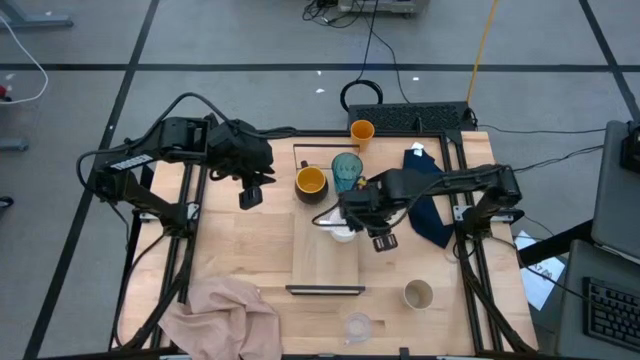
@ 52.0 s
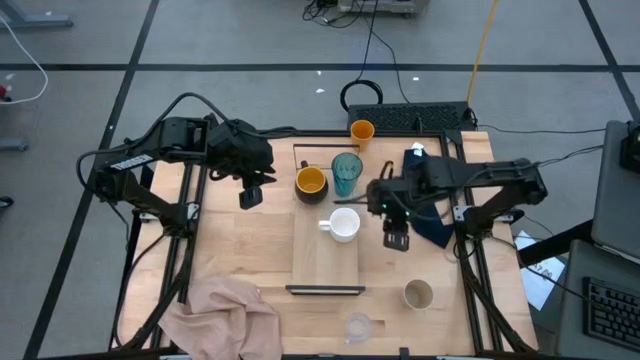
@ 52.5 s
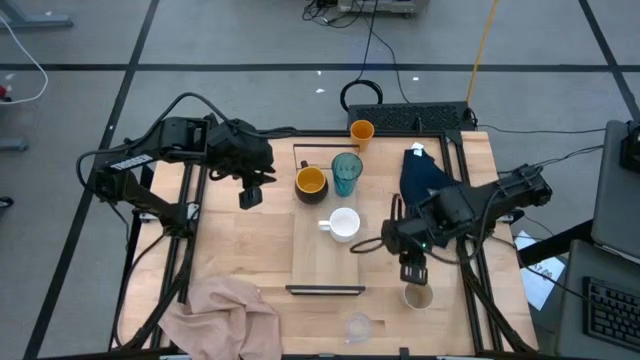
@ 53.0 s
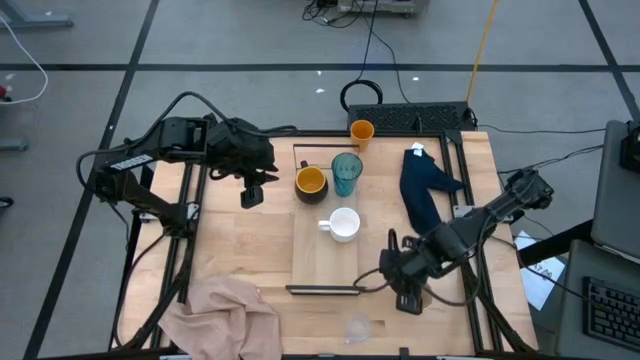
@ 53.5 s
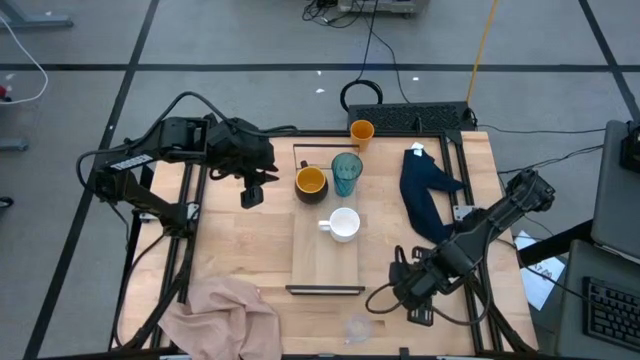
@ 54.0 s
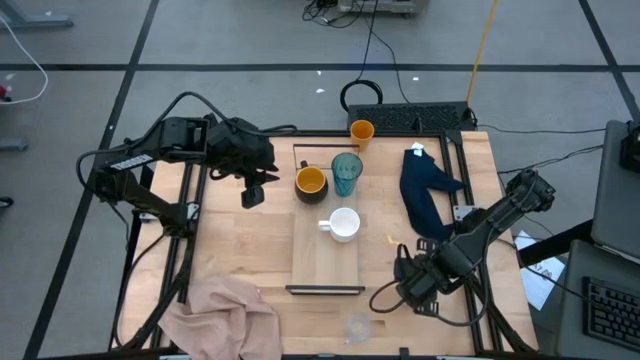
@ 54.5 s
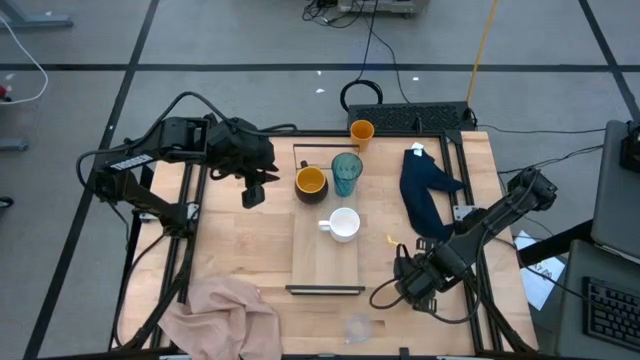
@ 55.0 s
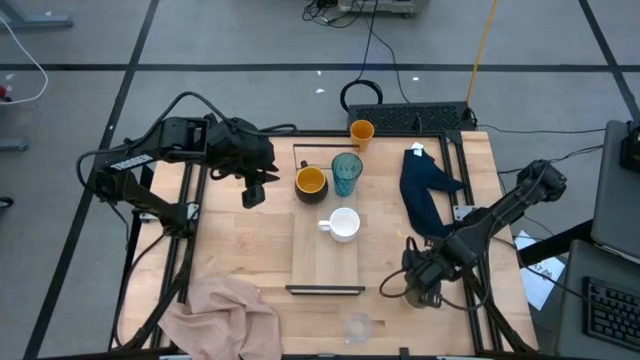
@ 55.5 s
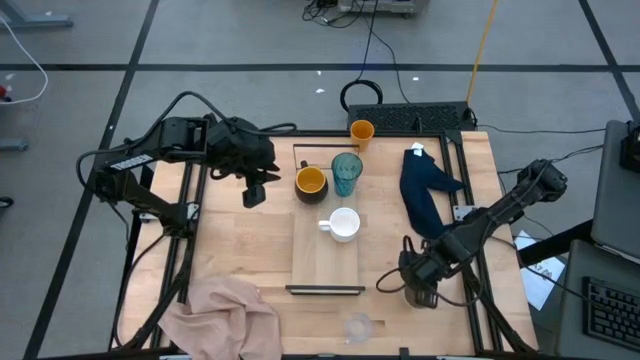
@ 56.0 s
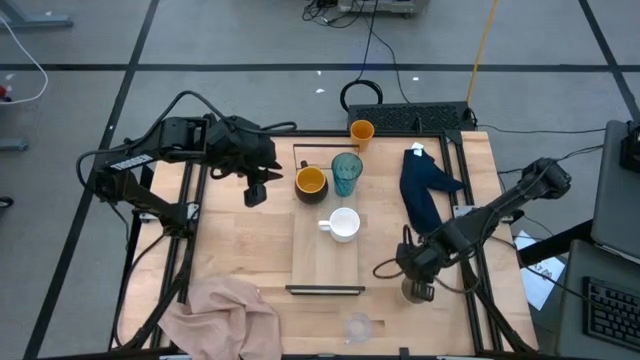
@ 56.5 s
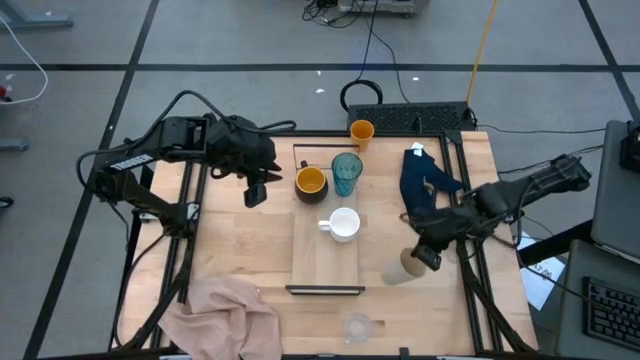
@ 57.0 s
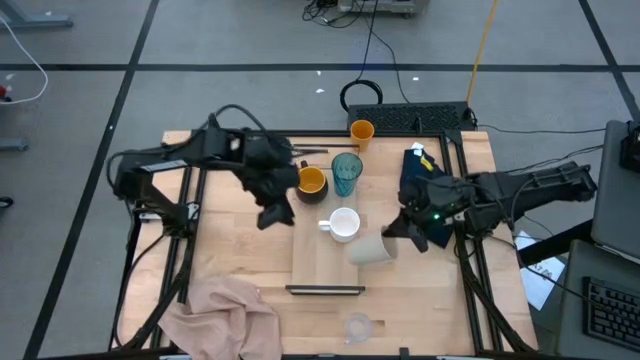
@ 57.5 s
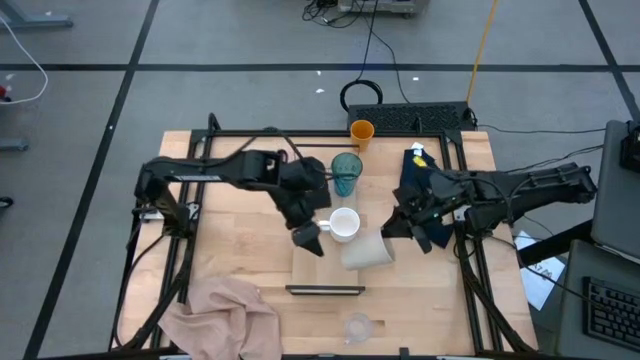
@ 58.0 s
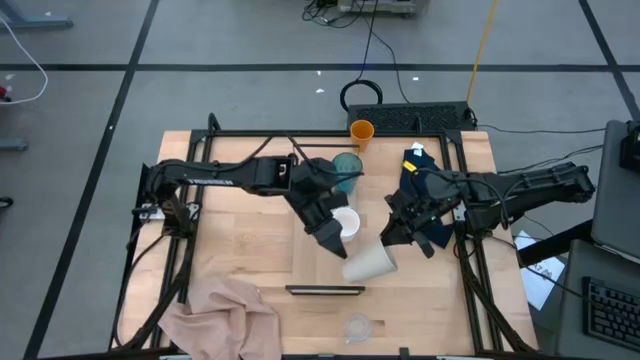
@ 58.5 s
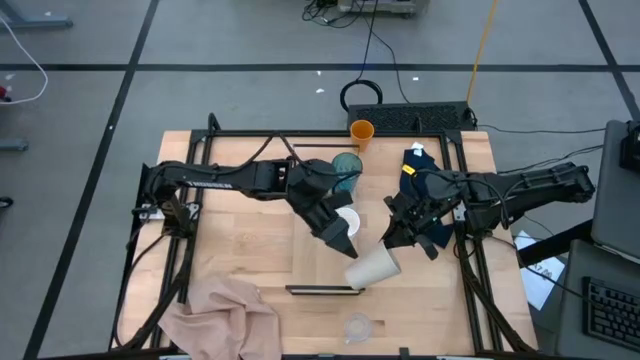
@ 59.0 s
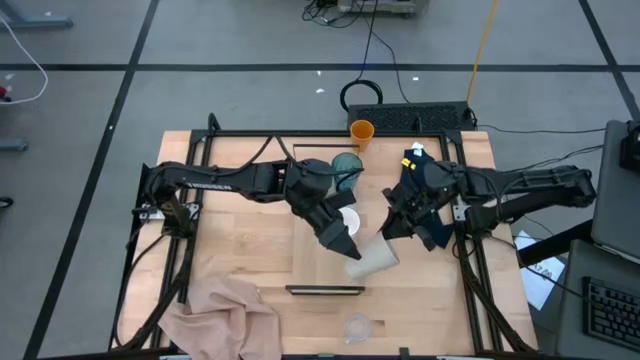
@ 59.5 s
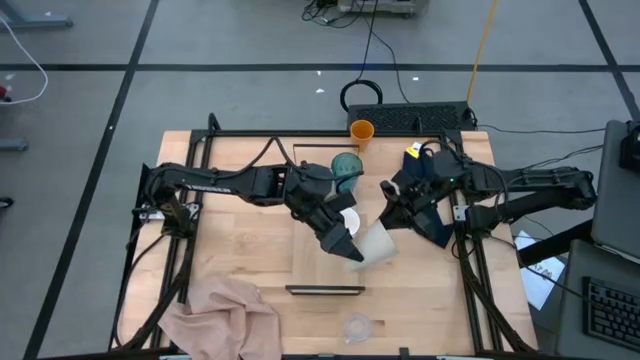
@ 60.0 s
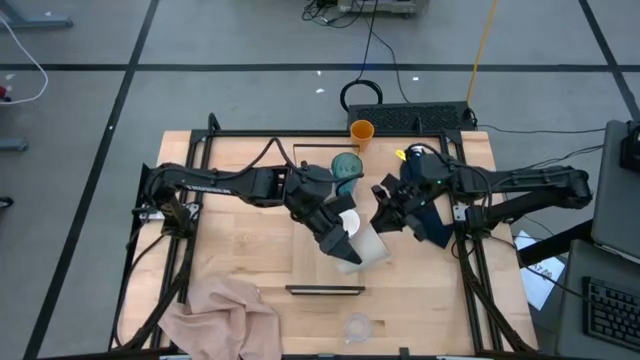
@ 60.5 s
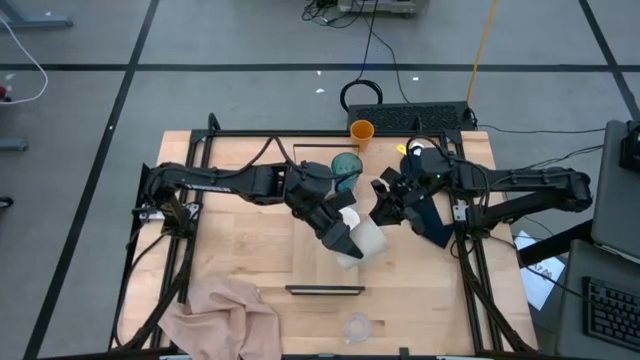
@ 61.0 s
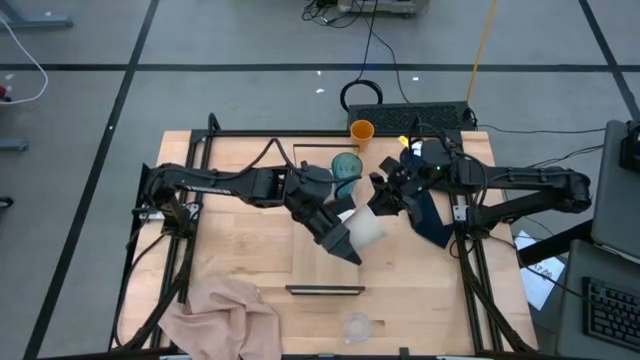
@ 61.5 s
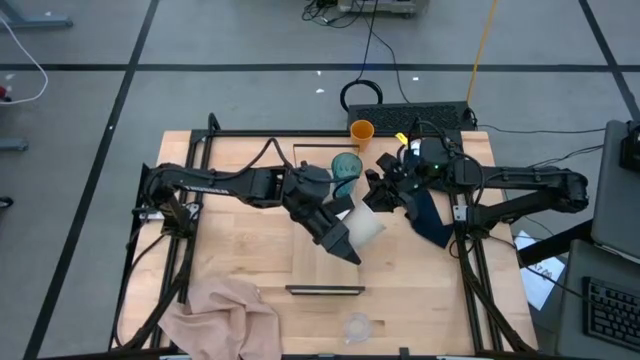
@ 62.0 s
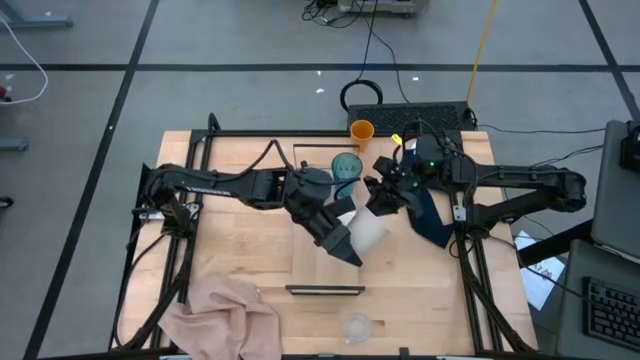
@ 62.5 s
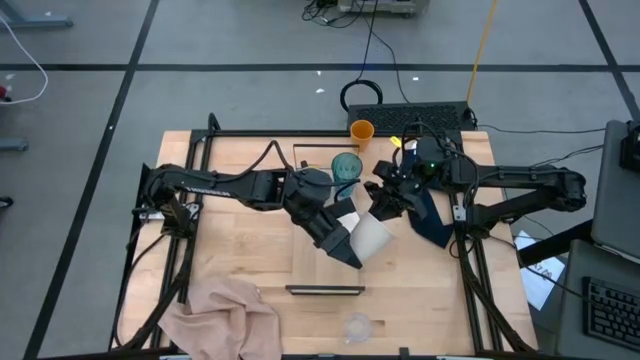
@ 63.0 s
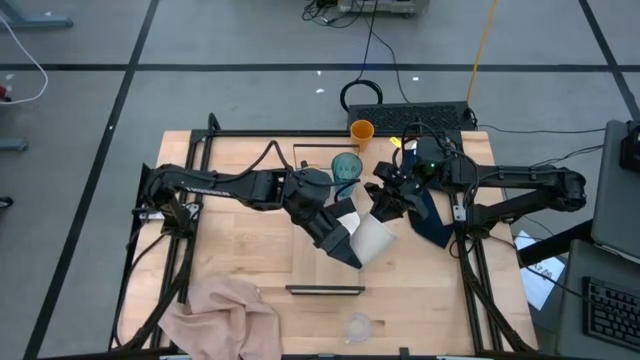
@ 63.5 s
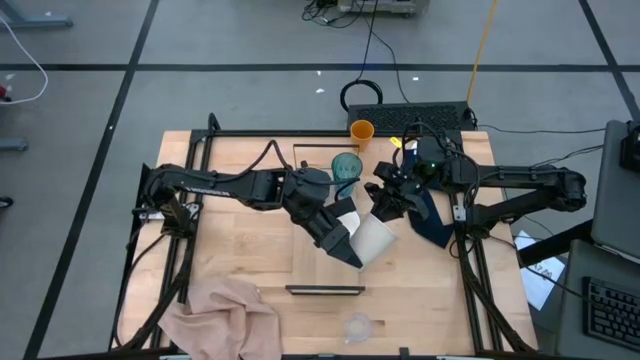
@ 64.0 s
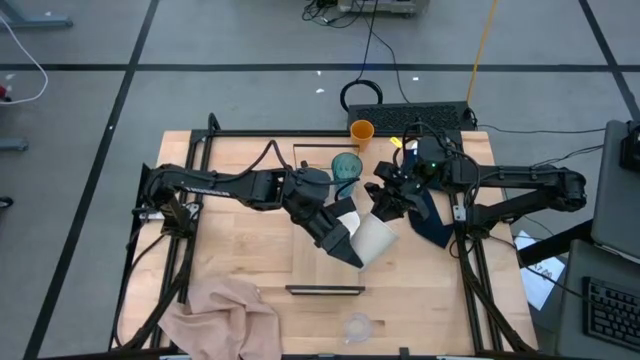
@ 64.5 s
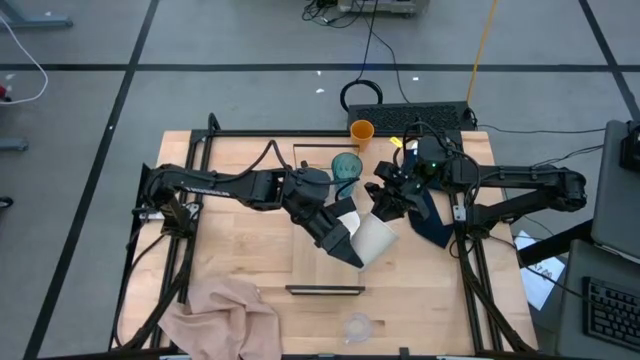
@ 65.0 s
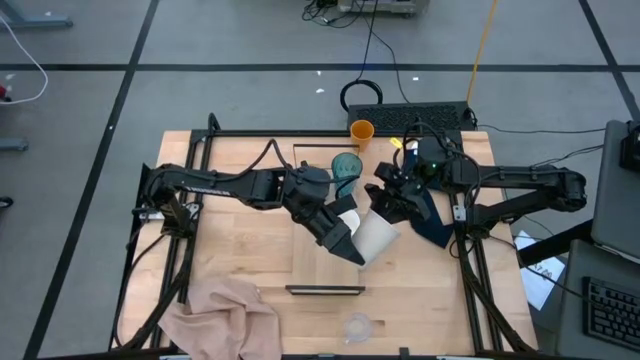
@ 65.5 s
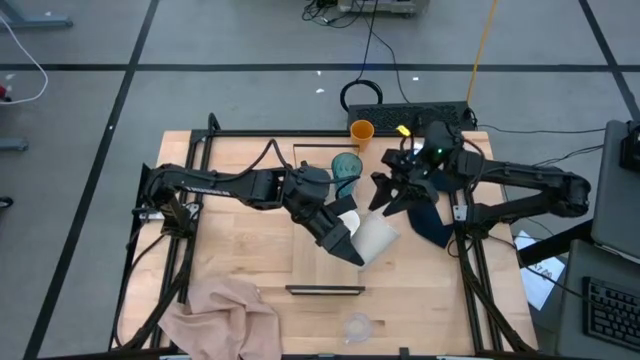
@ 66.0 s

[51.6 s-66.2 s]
Task: Stack small to large cups/mugs on shelf
Put the white cup on the shelf

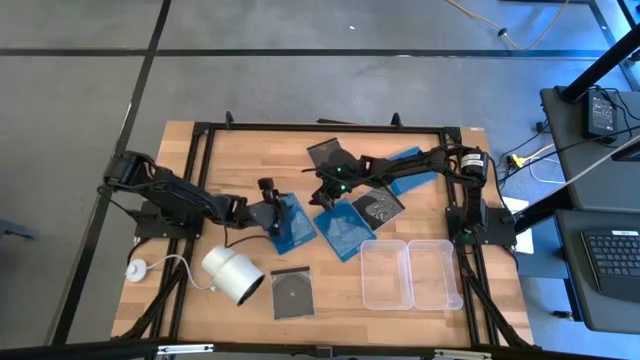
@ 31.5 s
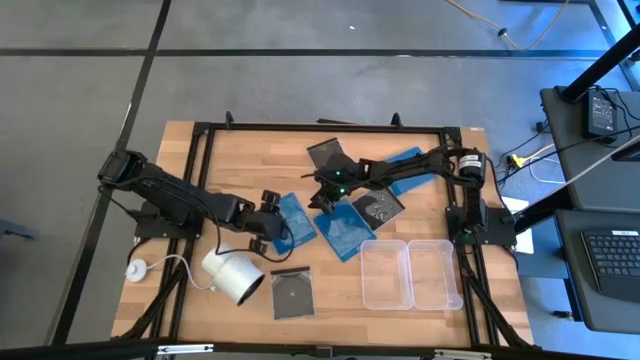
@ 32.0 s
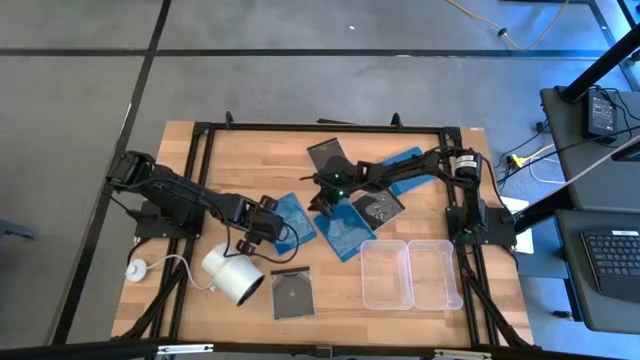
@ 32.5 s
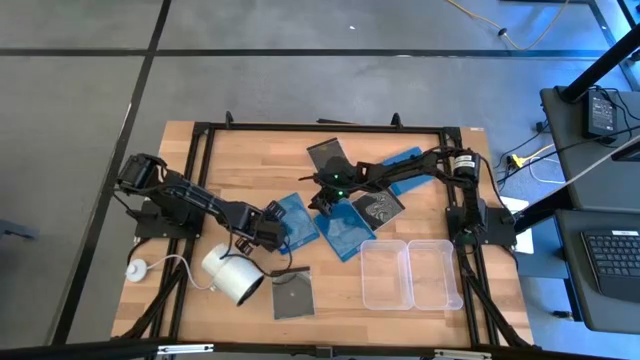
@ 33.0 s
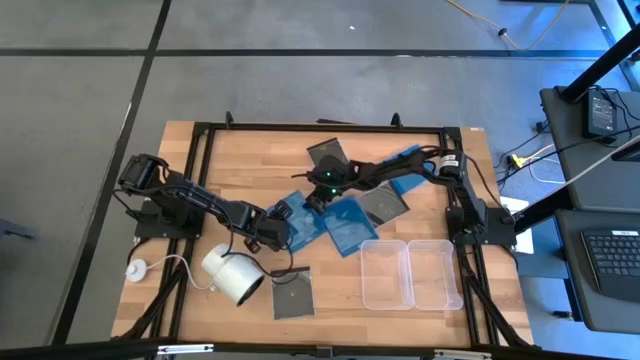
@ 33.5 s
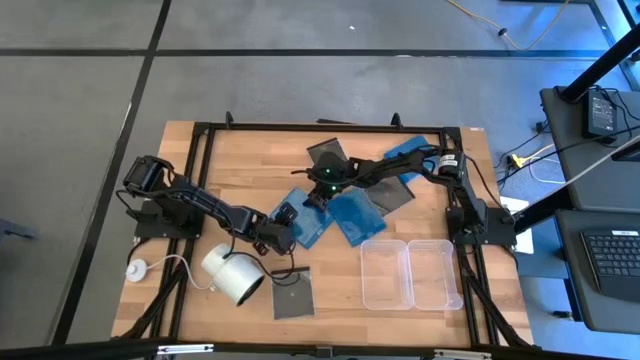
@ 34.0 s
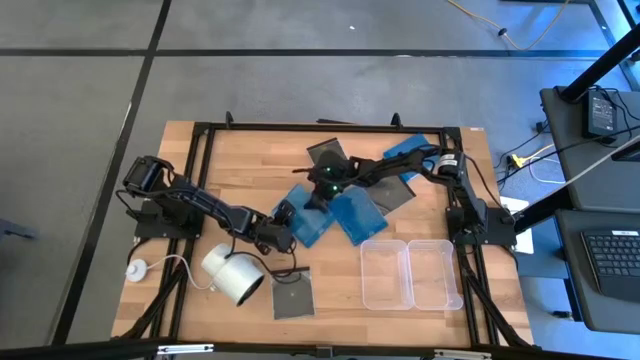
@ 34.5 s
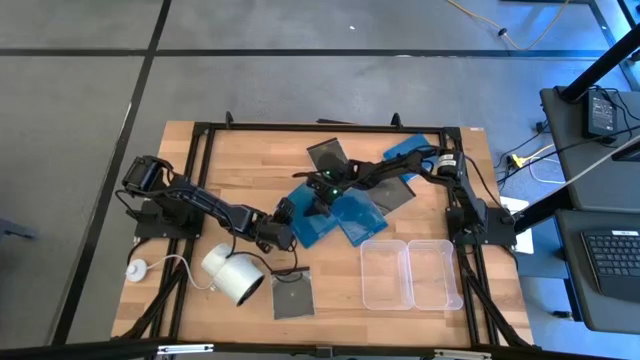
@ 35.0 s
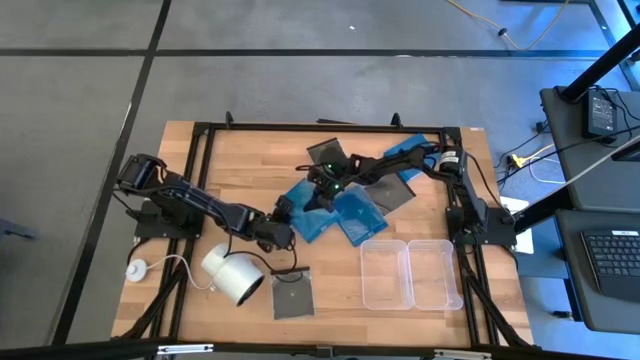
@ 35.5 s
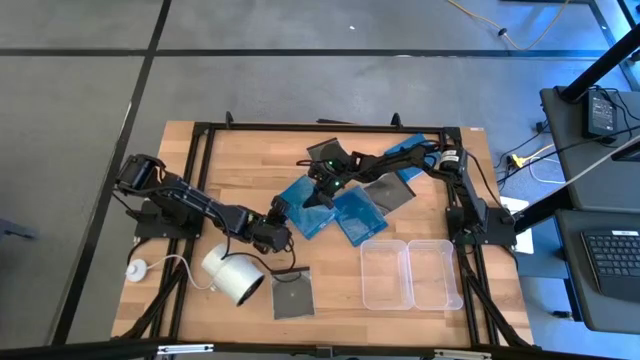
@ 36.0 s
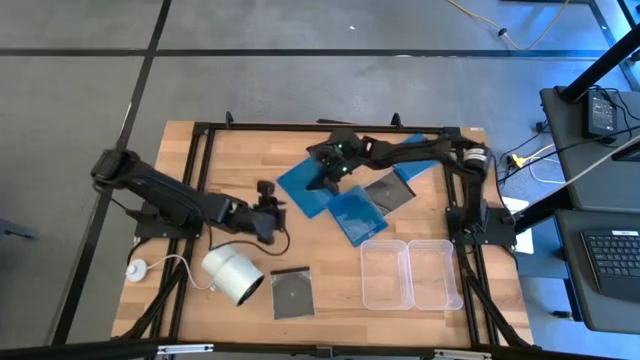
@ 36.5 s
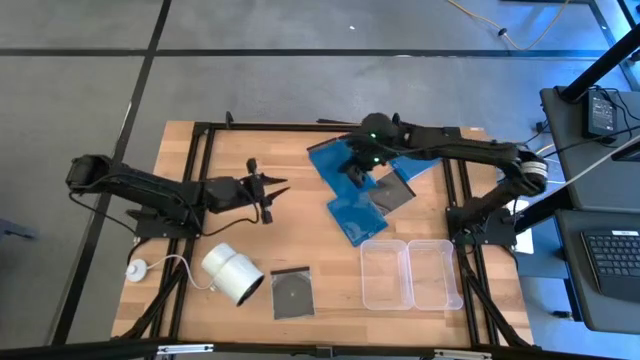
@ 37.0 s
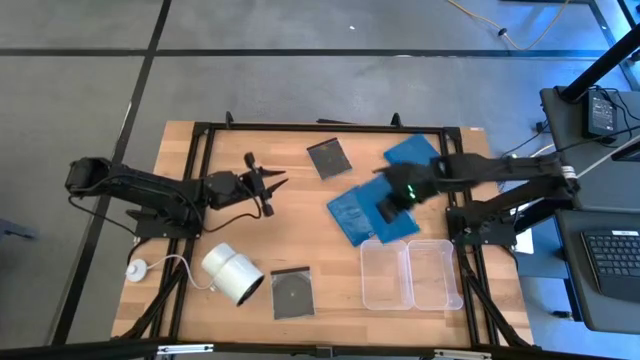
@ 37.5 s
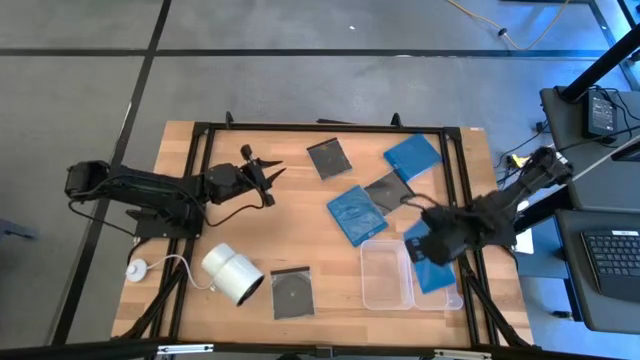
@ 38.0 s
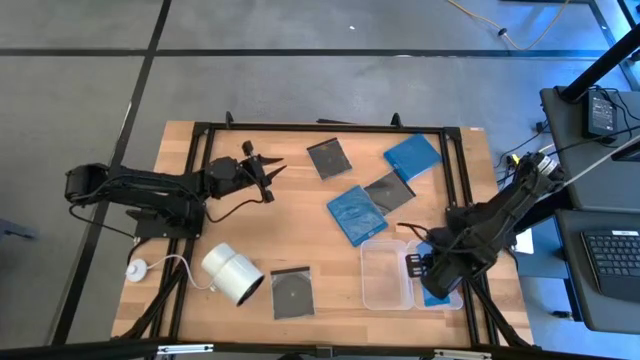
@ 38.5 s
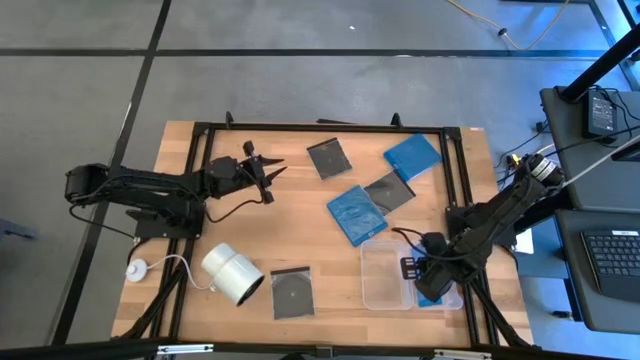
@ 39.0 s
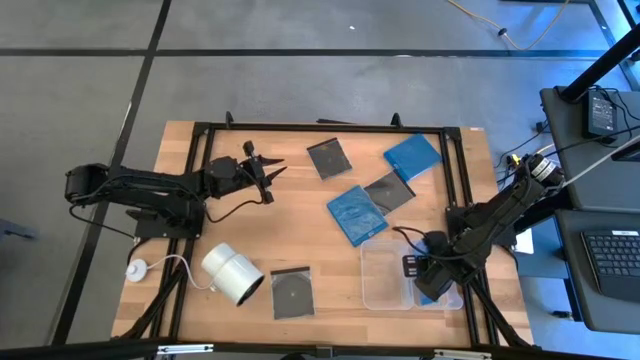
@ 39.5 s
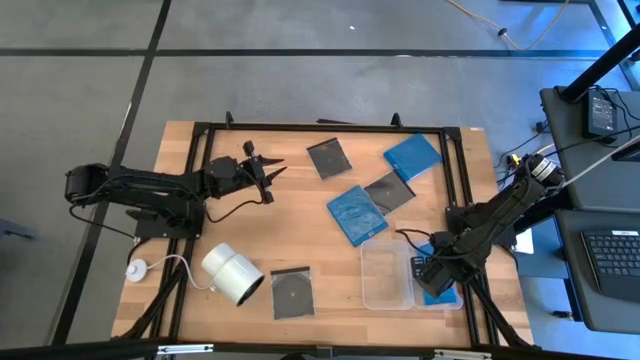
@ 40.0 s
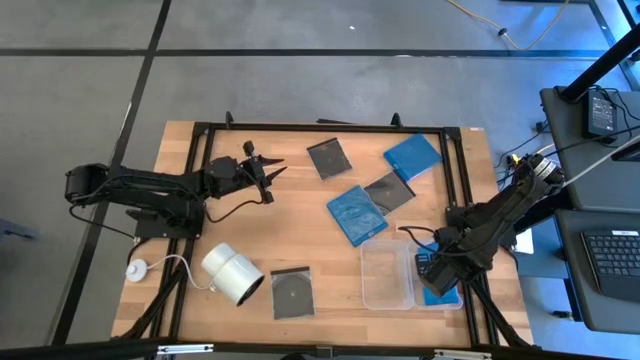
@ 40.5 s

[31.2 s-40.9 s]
Task: Pick & place jewel cases by type
Put the top left blue CD case into the right transparent bin
